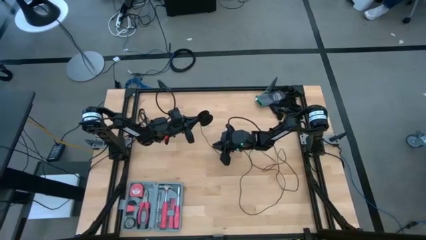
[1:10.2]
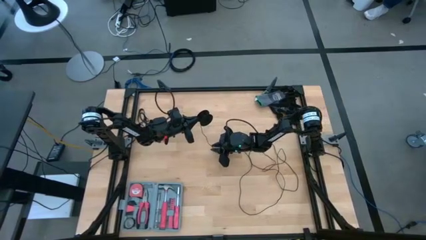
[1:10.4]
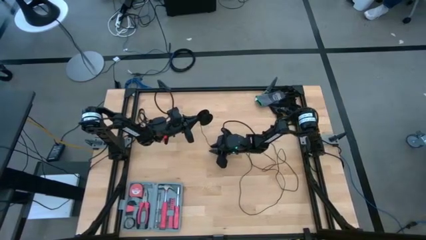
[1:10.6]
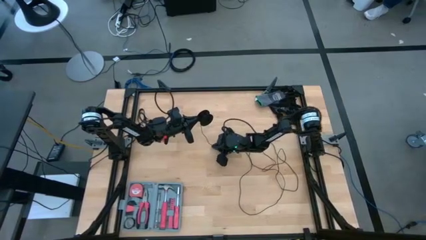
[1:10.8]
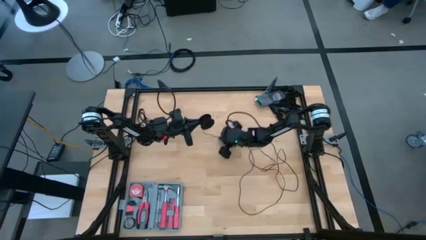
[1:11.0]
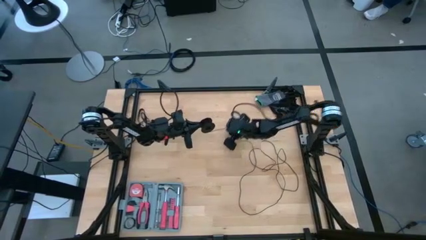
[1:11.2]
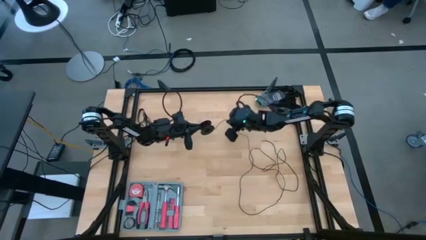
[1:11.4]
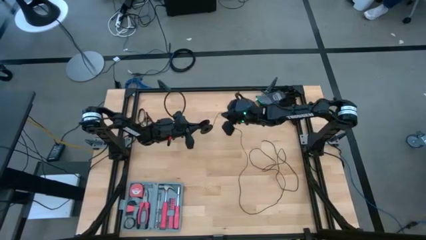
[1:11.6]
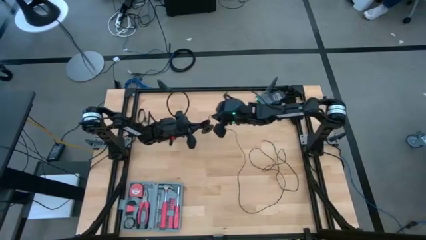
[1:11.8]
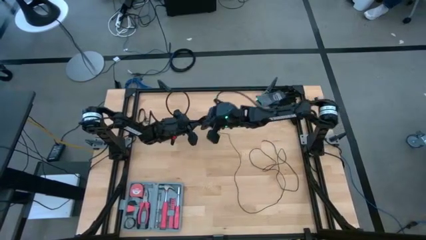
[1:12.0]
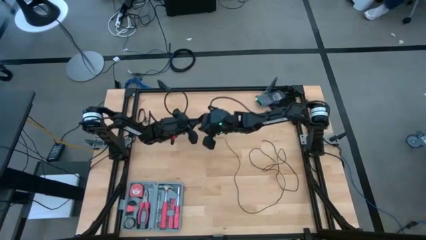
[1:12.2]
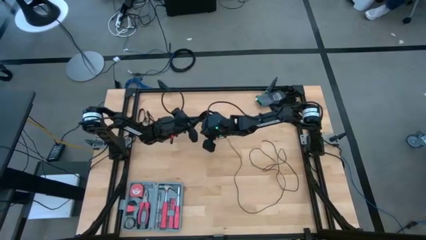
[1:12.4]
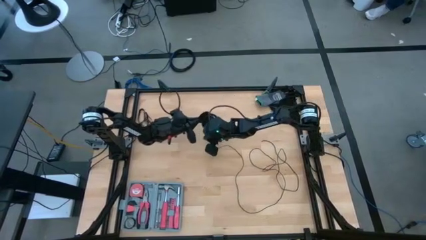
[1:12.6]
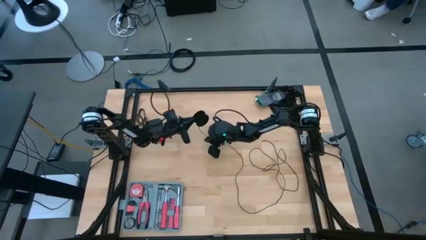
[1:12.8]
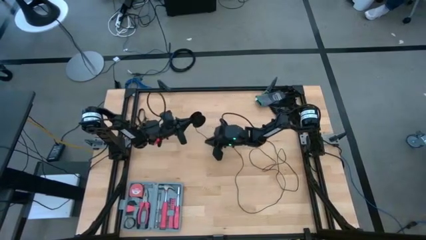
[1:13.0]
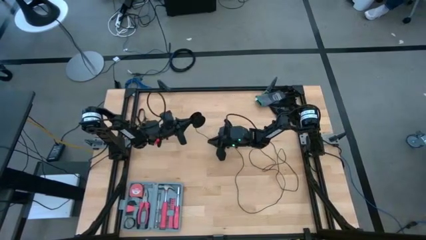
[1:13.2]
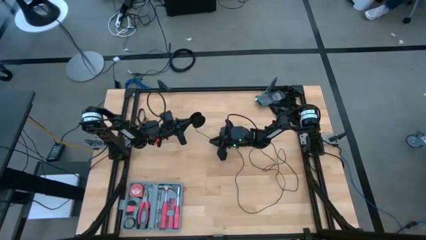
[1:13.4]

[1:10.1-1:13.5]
Task: Coil cords
Coil the black wire on the spool

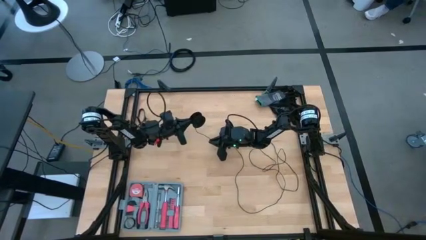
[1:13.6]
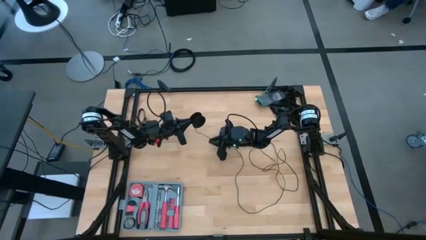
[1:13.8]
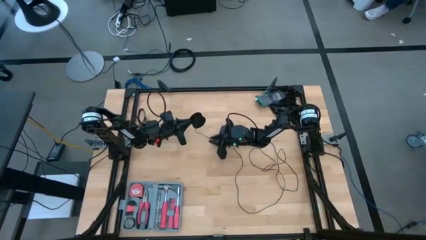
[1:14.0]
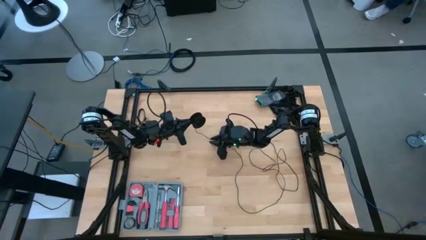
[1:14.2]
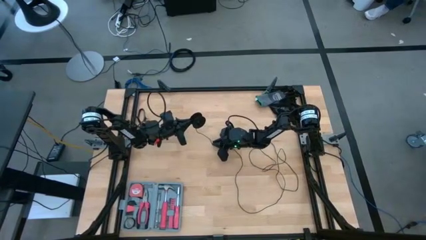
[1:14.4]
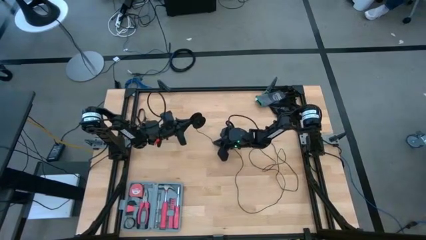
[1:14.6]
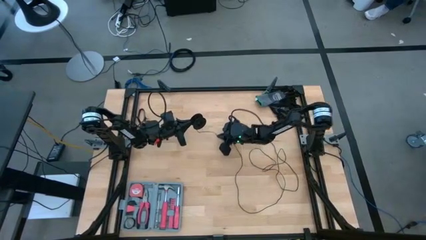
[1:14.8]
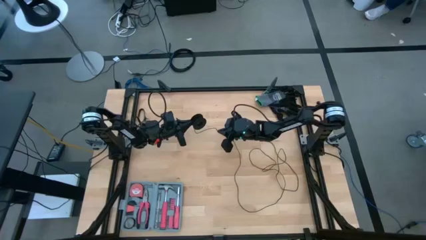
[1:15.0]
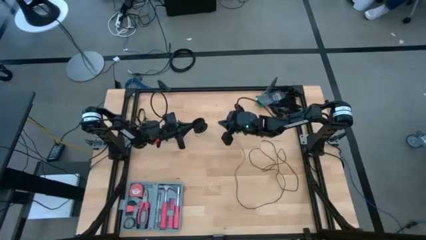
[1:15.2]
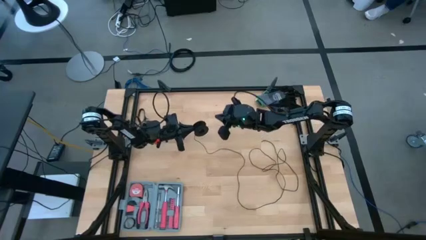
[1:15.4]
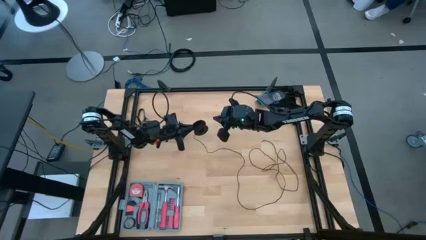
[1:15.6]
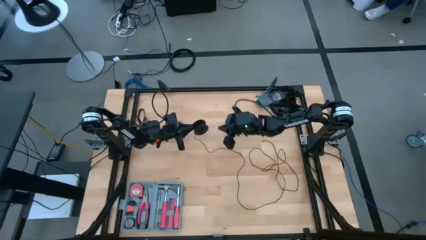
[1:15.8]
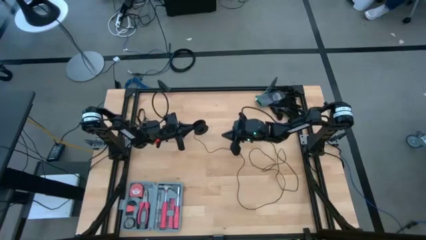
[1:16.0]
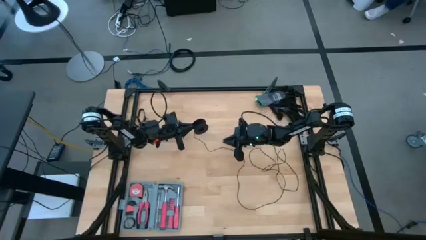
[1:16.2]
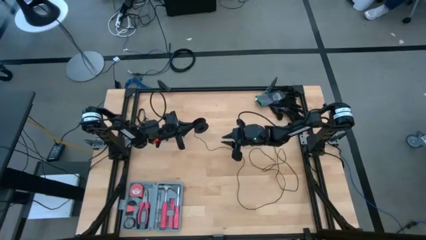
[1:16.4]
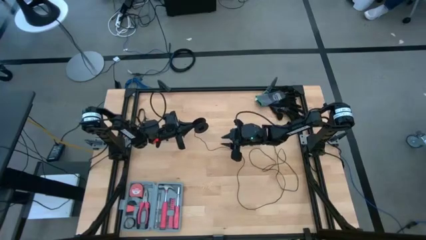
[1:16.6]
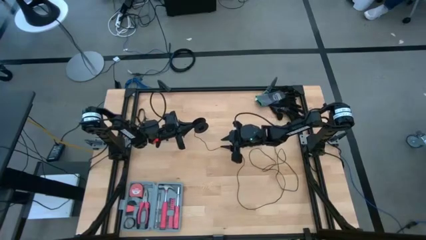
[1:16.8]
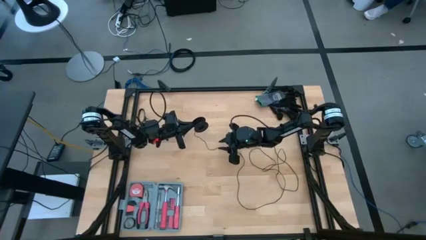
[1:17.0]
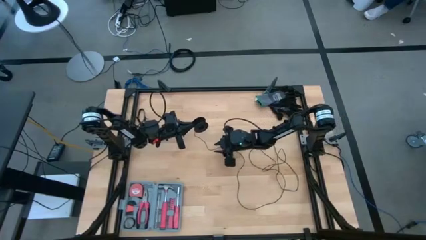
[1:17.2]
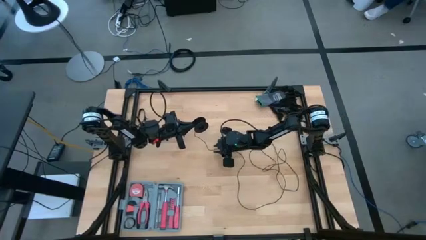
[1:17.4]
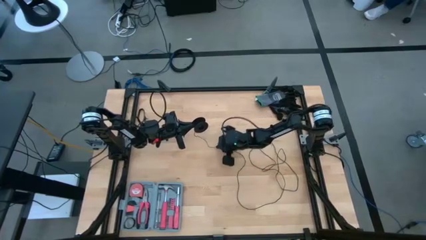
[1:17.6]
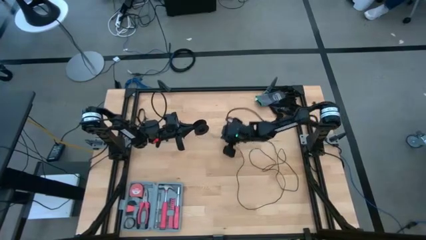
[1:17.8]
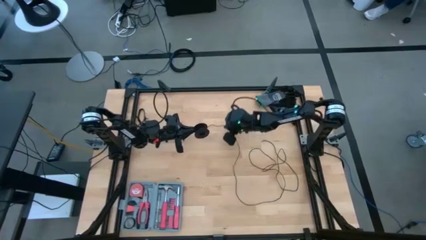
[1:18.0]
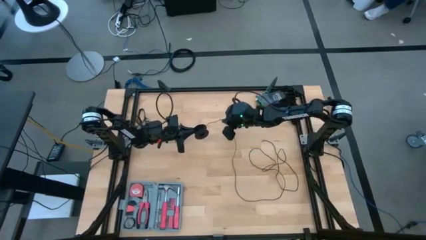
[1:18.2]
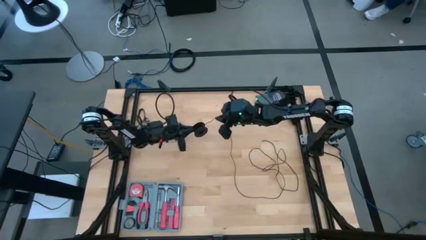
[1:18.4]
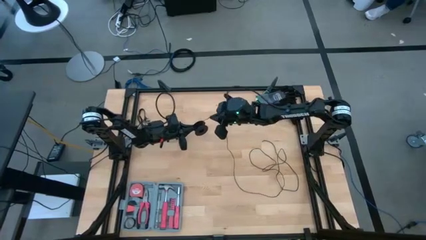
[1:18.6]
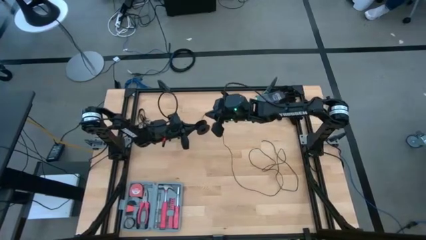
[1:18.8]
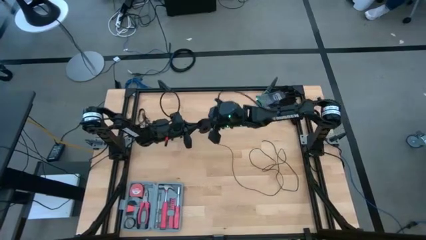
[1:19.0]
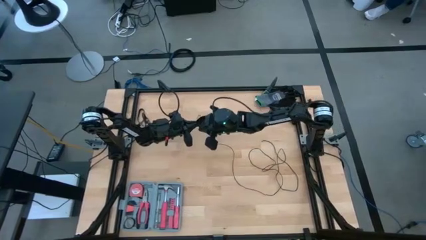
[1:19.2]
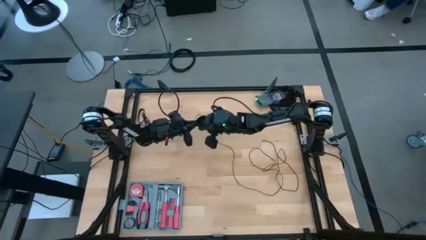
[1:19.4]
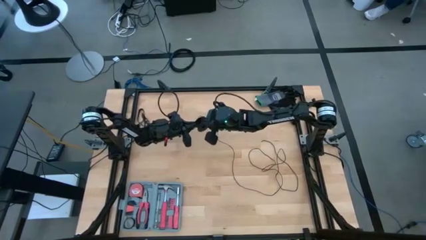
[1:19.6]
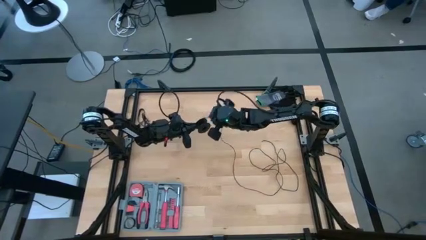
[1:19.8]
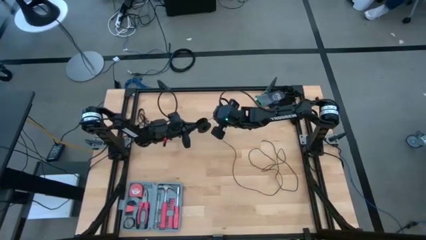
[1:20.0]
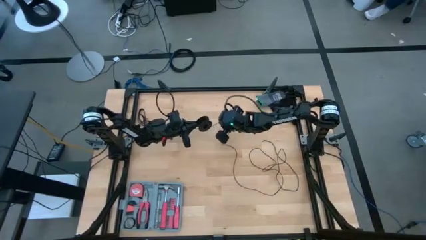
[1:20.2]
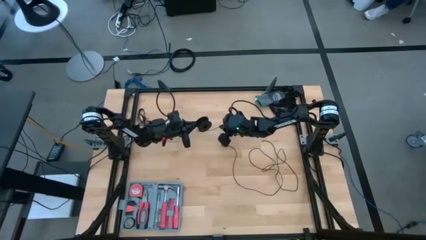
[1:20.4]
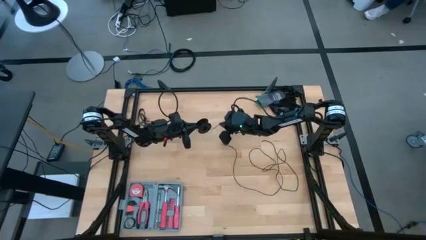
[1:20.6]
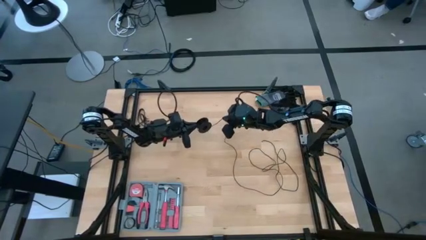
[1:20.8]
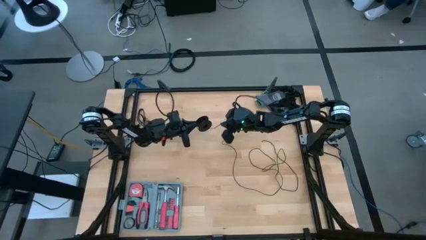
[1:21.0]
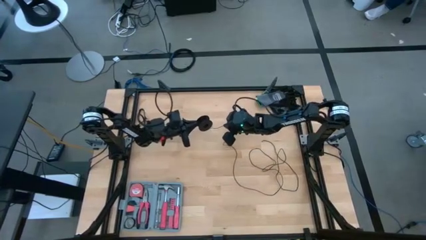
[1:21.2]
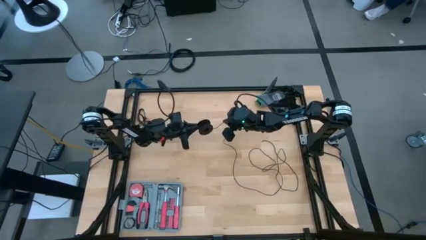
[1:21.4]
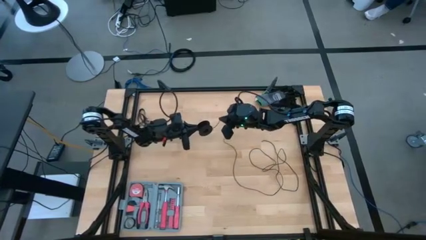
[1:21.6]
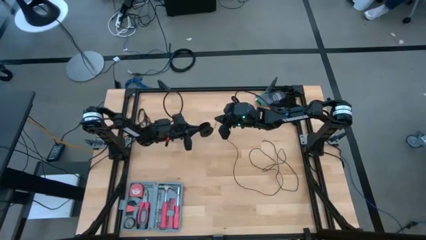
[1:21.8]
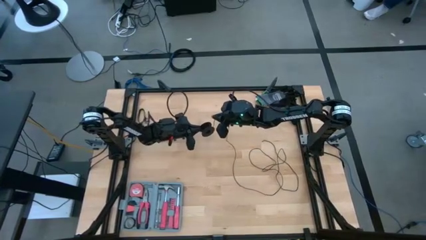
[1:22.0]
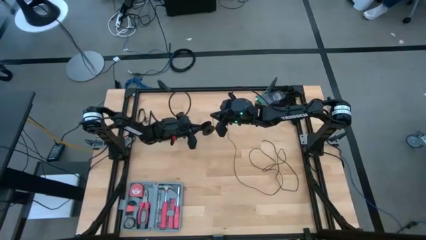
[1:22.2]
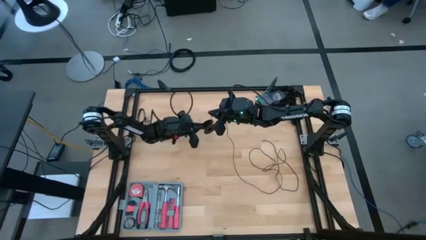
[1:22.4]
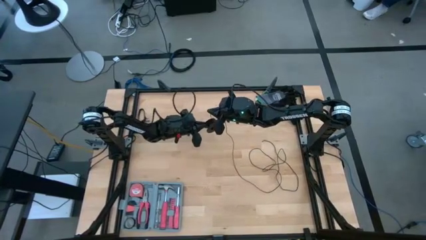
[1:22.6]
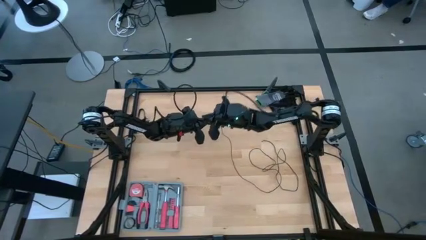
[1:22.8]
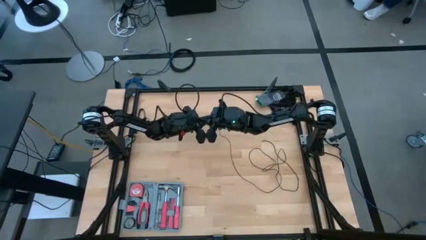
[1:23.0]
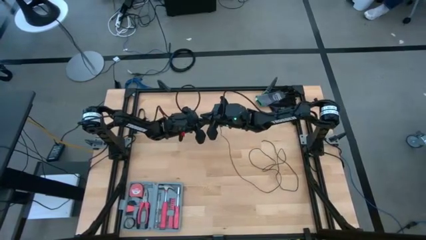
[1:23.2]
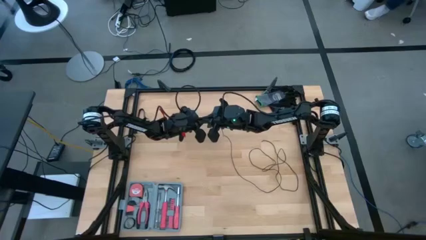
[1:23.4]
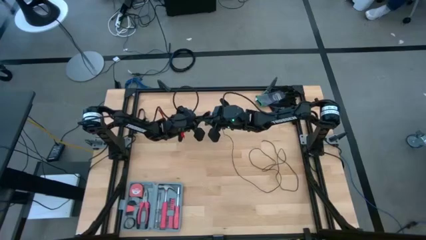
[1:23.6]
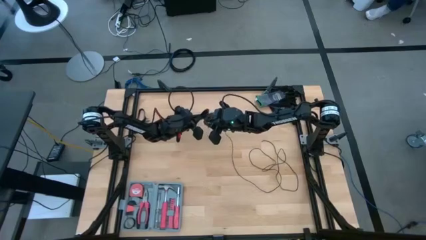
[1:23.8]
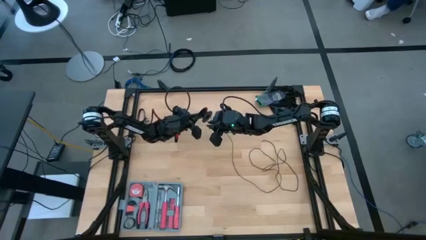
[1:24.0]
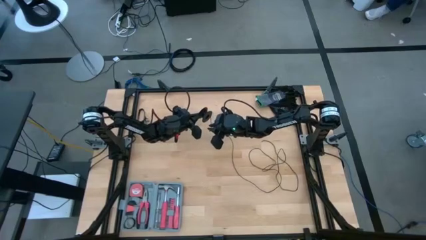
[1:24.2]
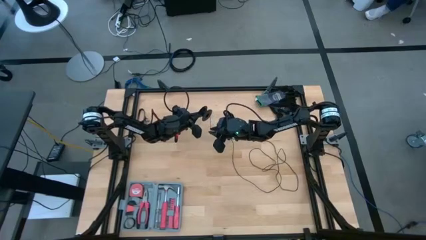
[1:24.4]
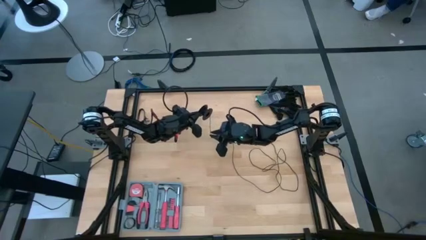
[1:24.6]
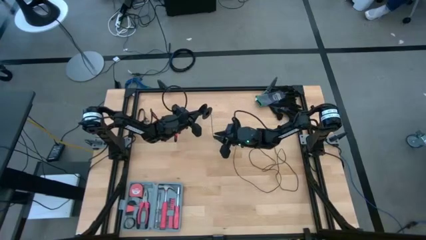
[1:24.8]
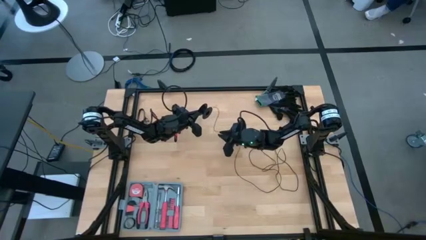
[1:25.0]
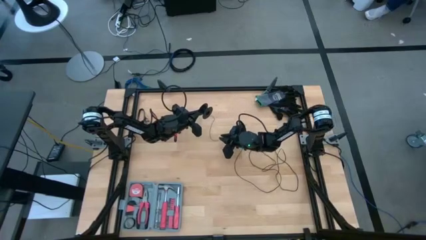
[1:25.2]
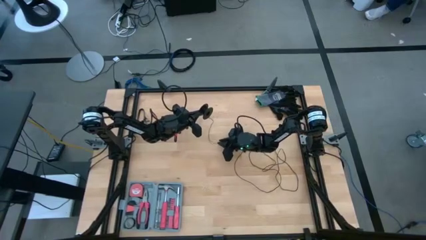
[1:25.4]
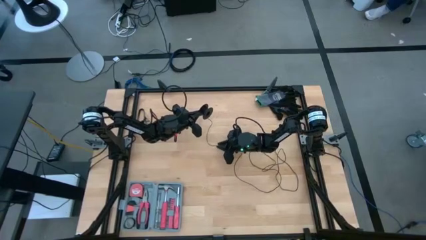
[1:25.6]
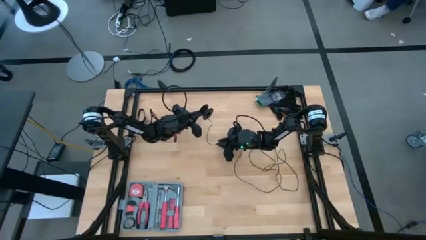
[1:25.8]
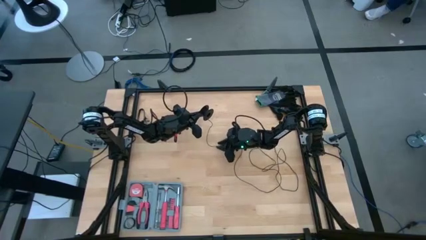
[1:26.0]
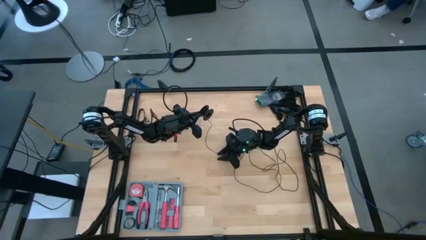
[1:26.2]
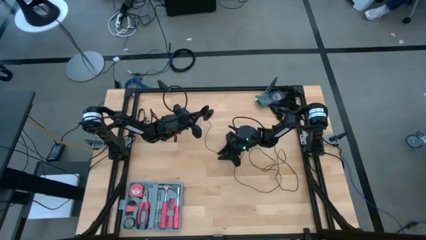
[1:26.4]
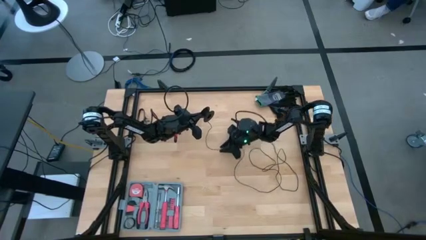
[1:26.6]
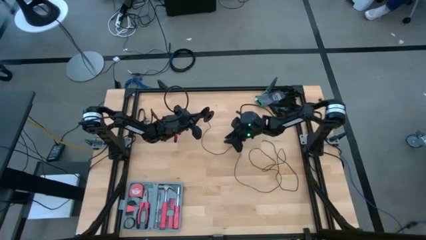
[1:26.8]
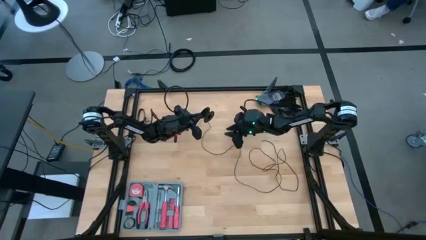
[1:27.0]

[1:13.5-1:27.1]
Coil the black wire on the spool
